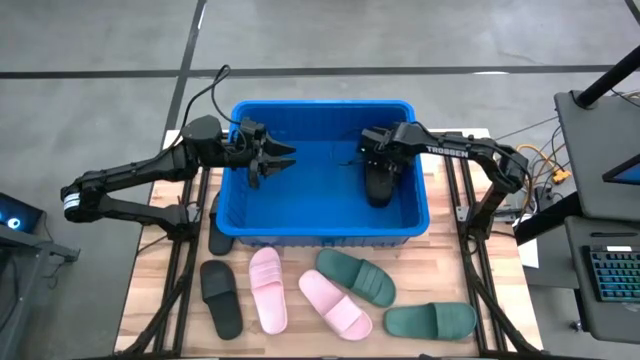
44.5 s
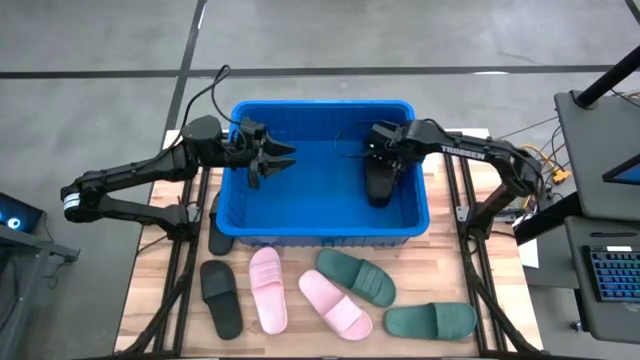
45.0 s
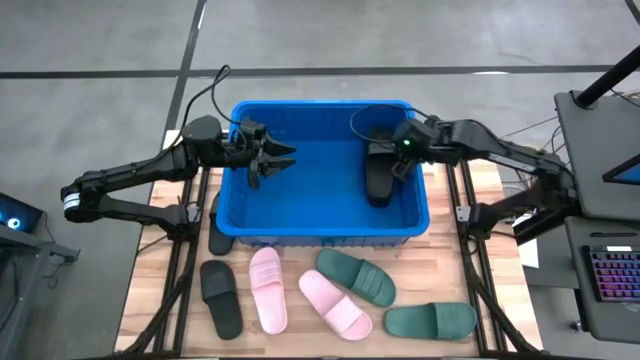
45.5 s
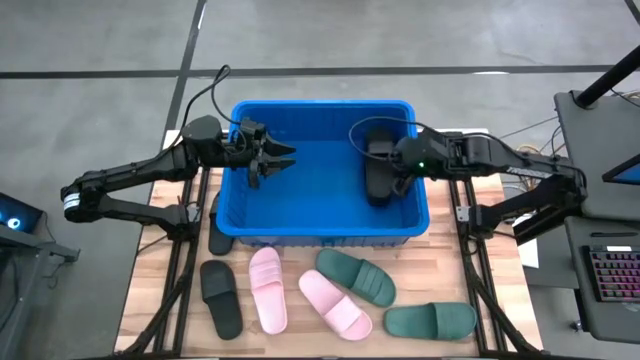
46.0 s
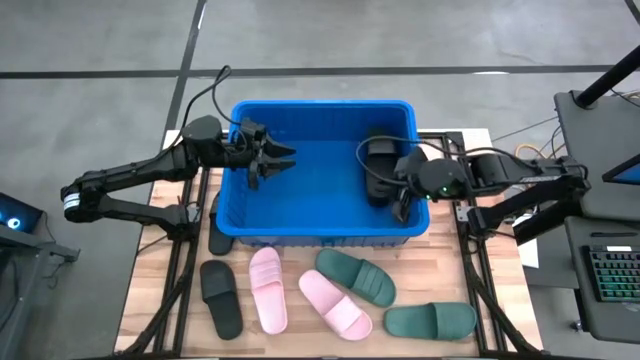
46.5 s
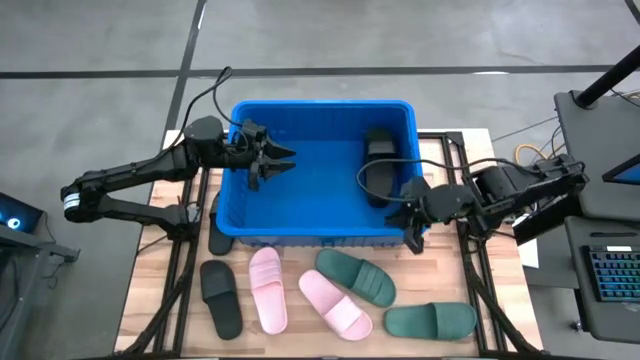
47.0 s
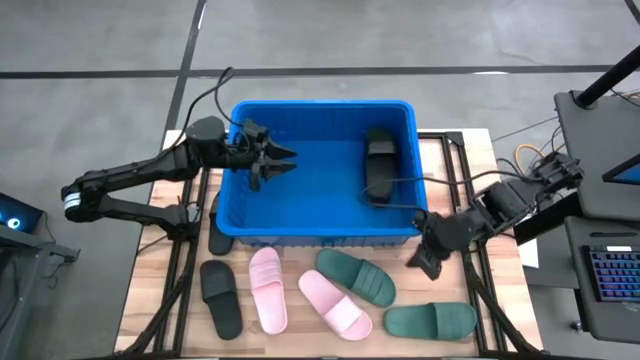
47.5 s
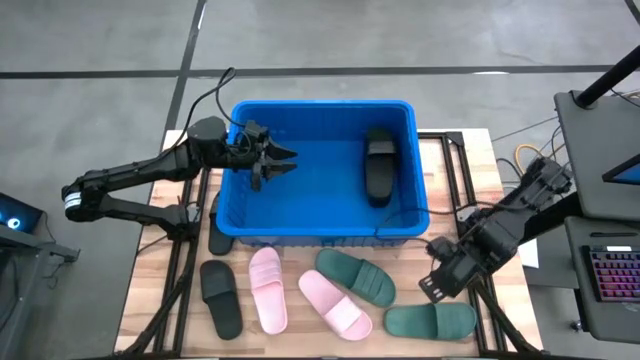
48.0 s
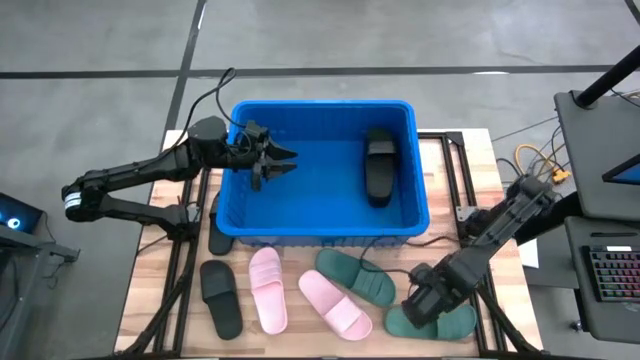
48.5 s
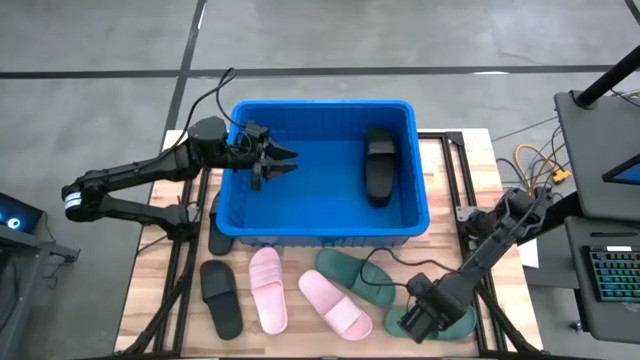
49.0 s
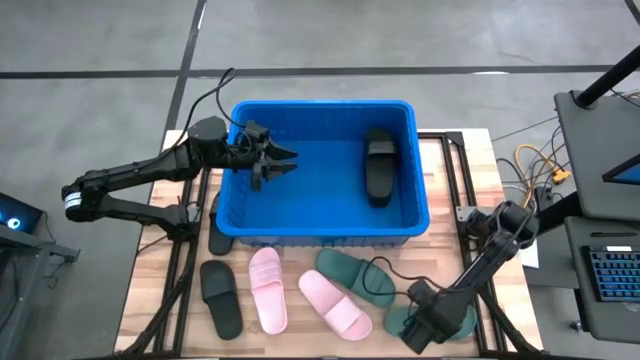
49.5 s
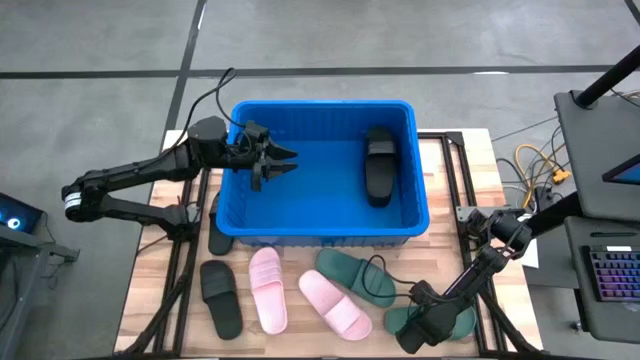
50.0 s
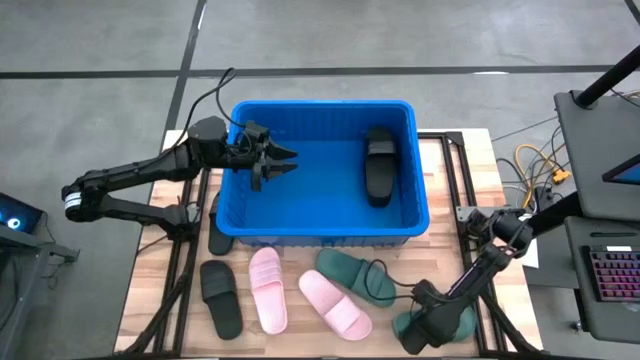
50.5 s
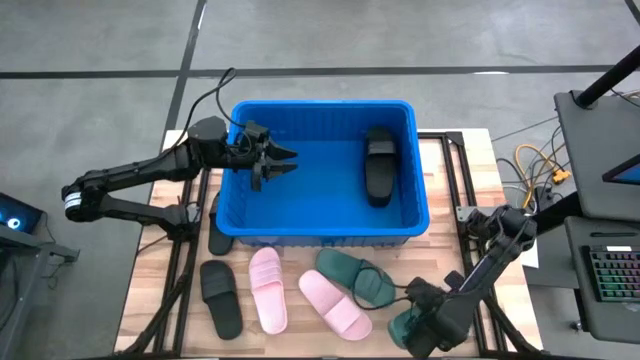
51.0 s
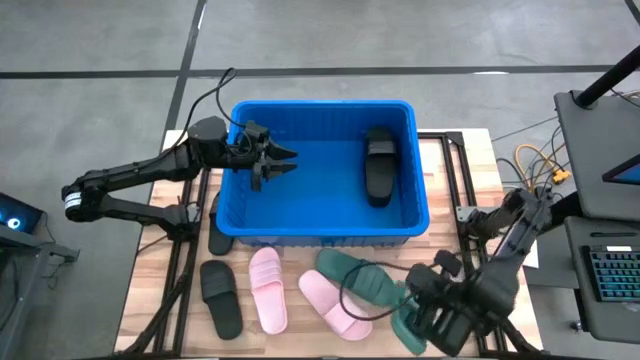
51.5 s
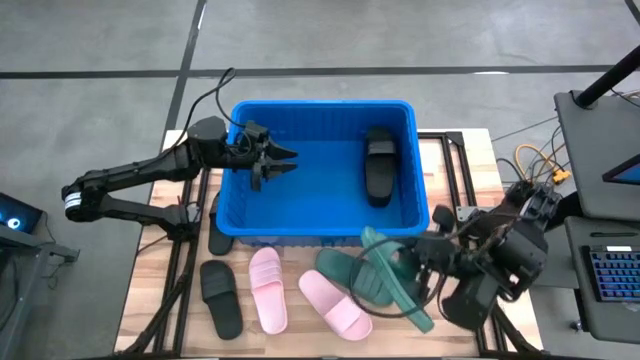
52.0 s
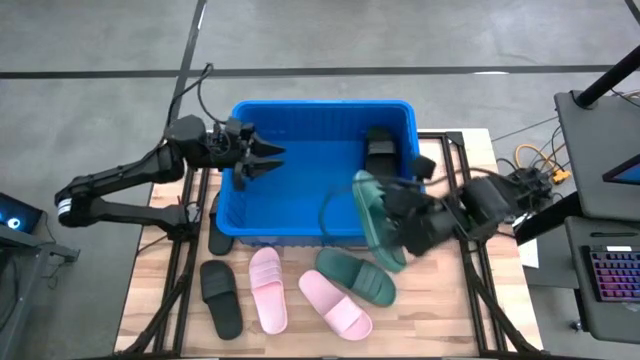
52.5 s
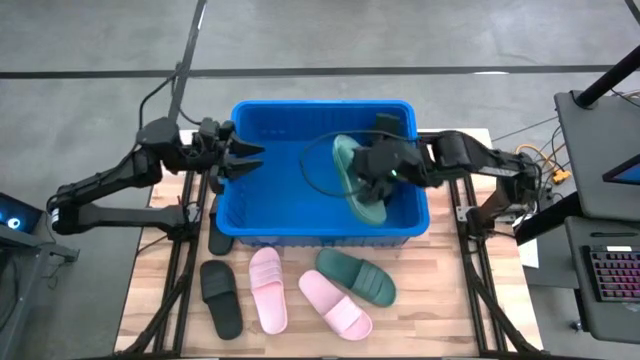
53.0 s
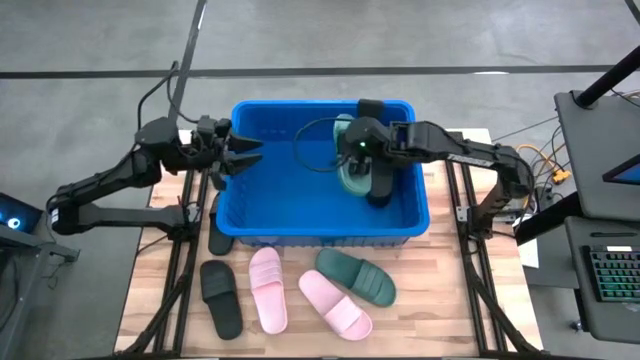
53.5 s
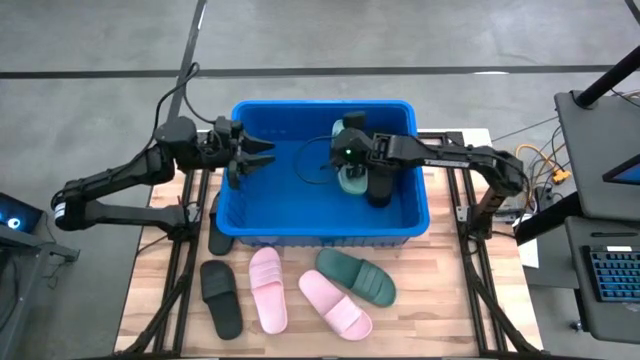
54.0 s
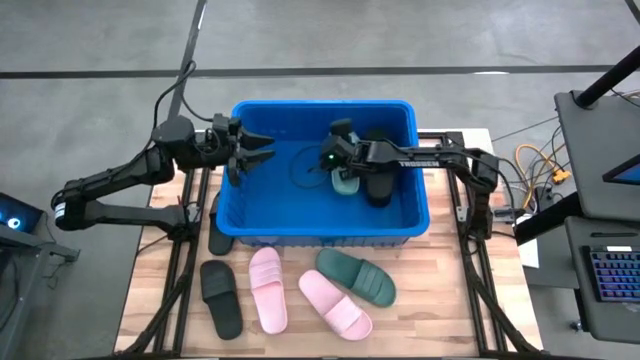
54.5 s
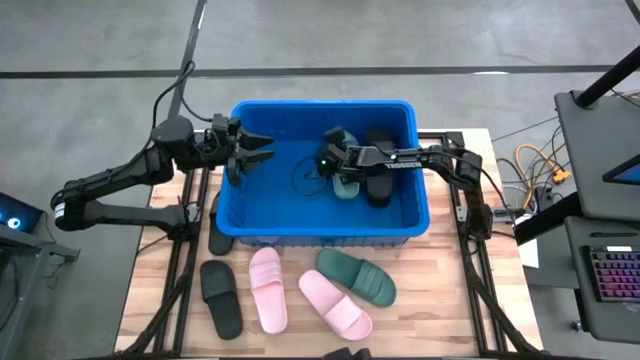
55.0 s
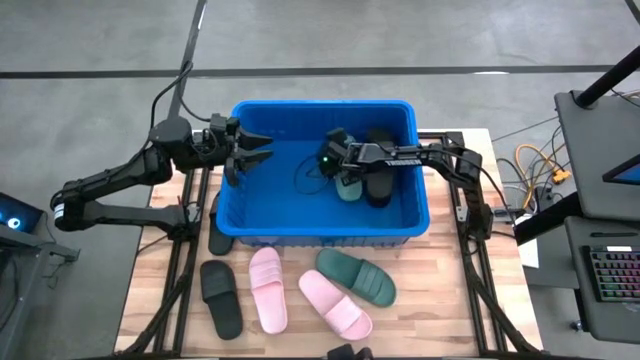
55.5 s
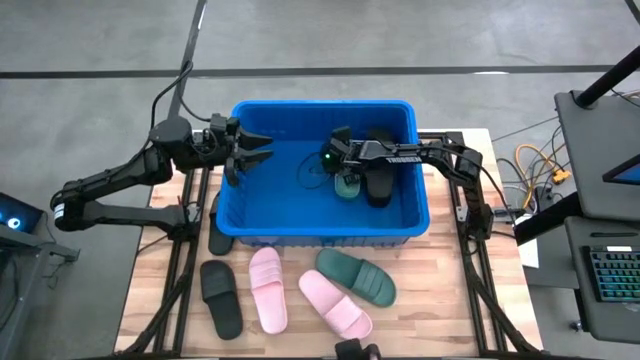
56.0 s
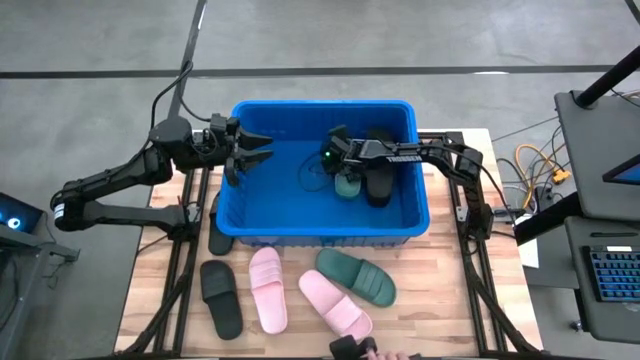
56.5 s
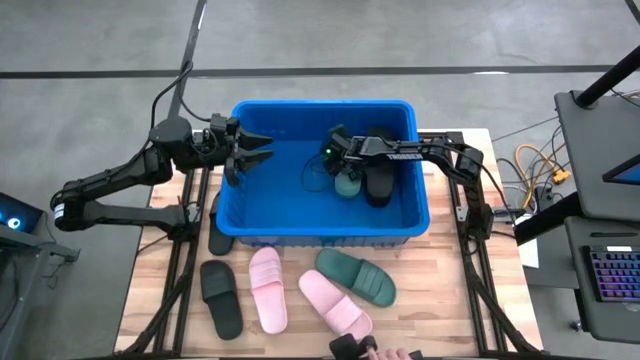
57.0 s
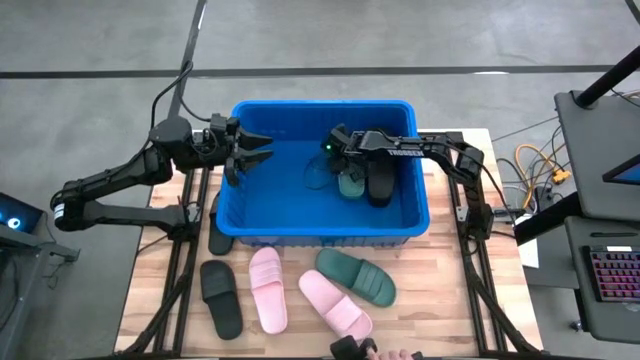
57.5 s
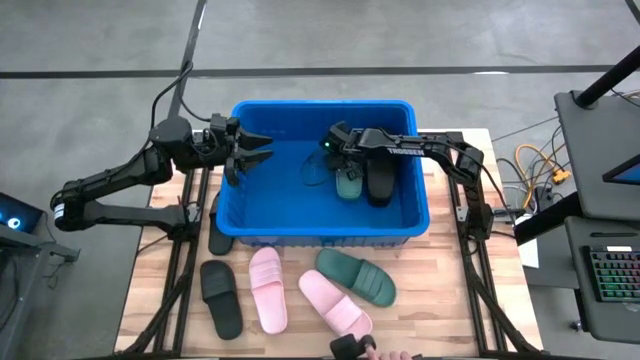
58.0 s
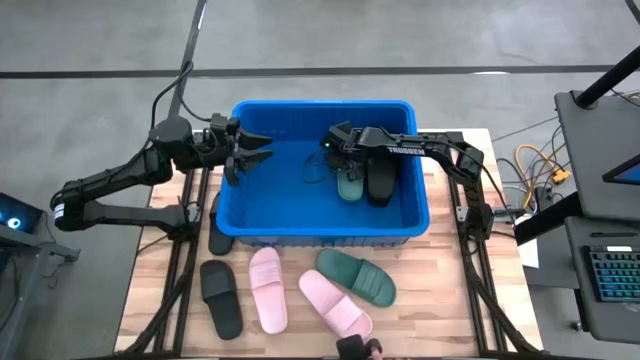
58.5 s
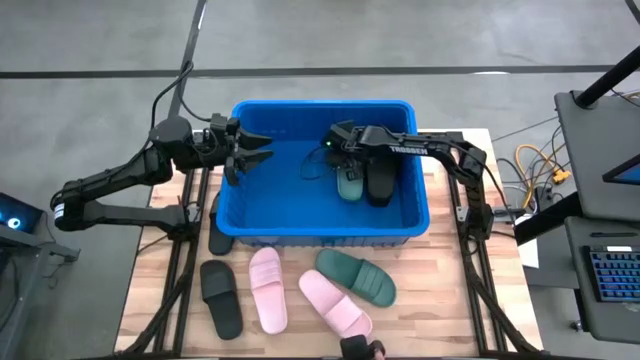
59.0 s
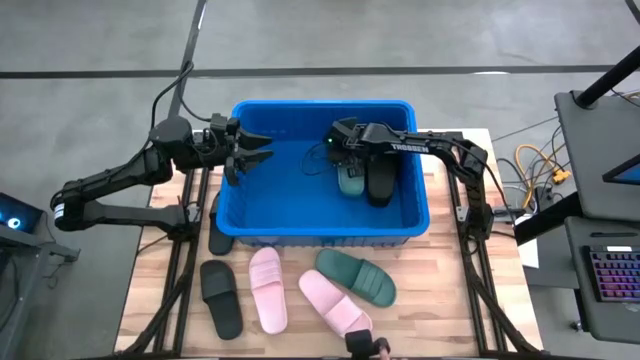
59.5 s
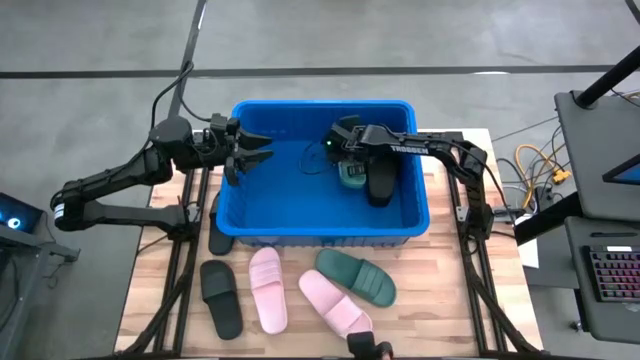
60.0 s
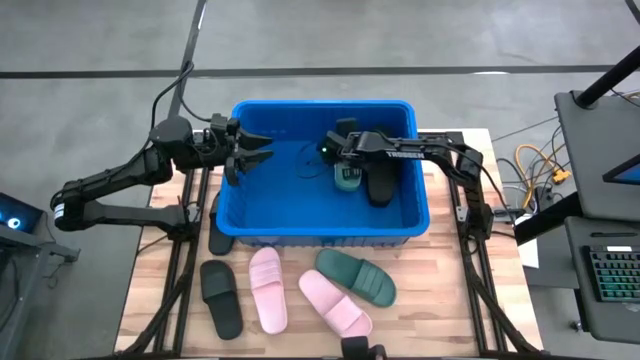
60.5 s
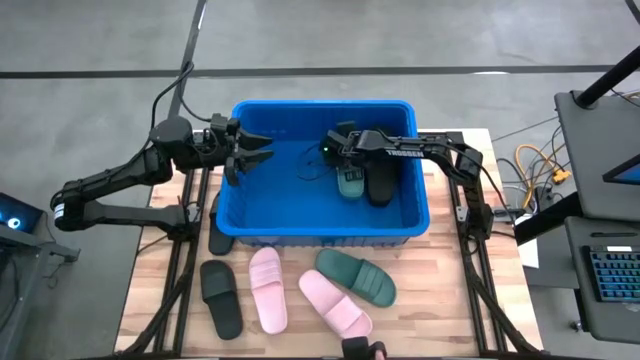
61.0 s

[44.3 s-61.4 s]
Task: Pick and place slides into bin
Put the green slide into the blue bin

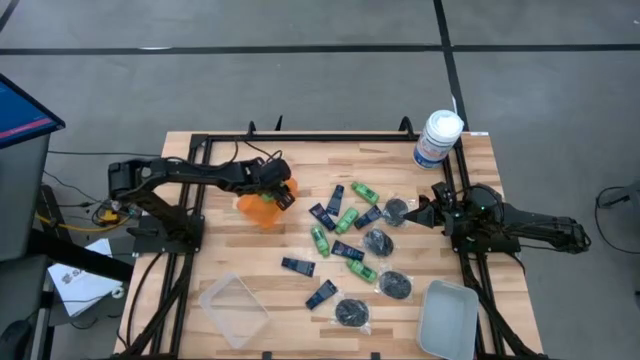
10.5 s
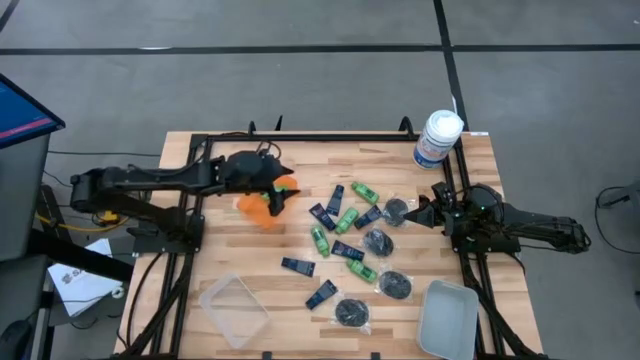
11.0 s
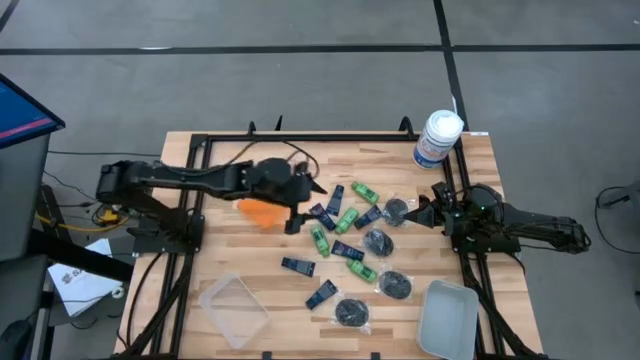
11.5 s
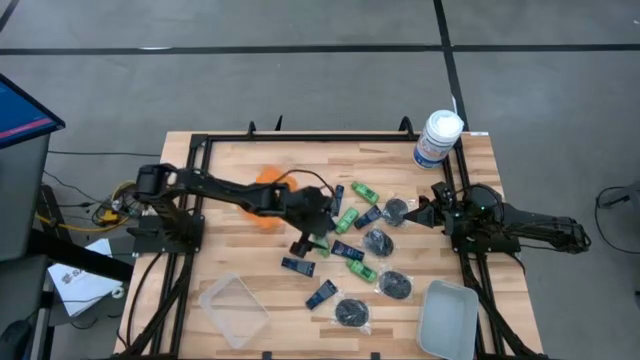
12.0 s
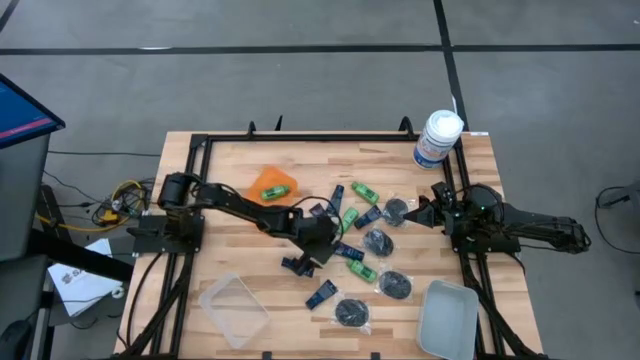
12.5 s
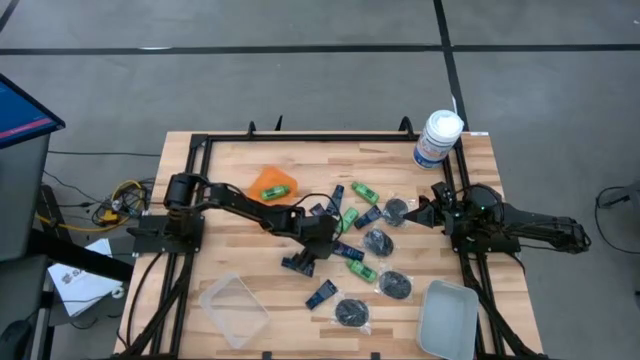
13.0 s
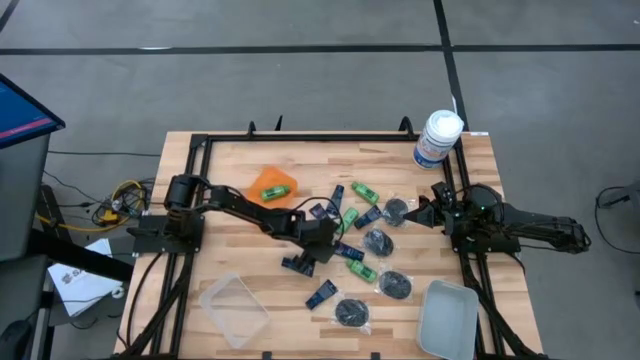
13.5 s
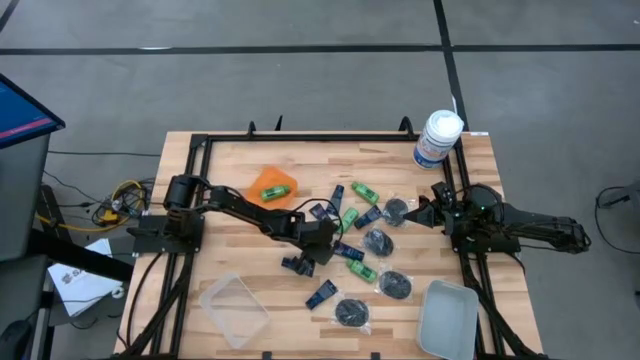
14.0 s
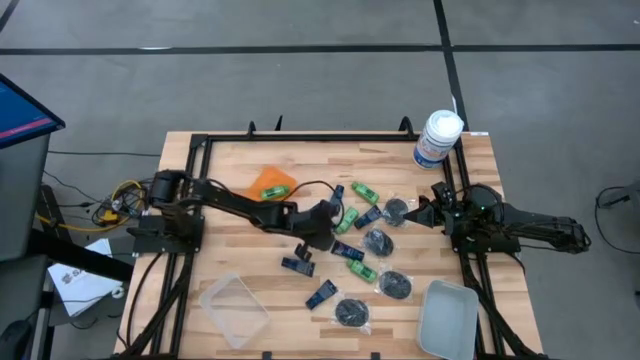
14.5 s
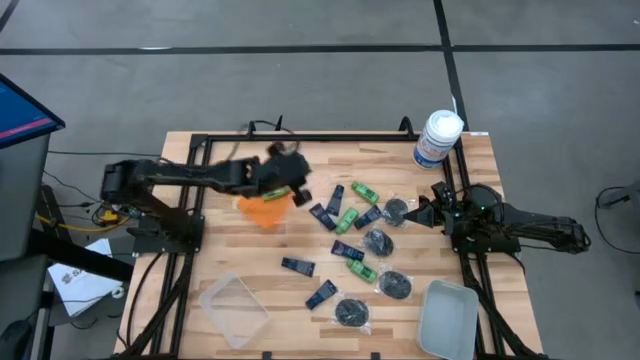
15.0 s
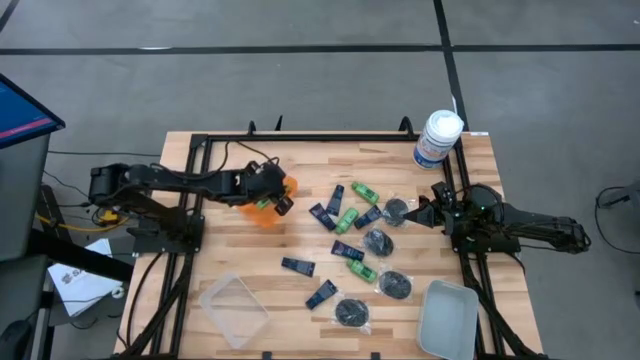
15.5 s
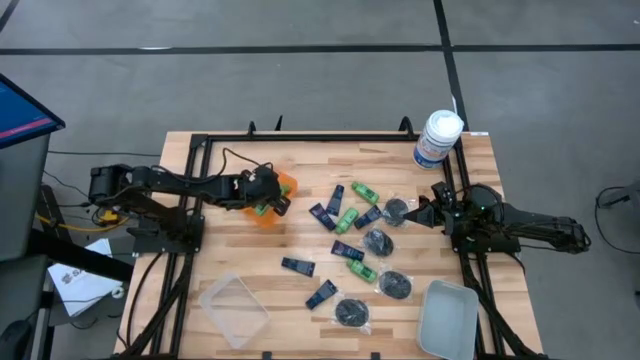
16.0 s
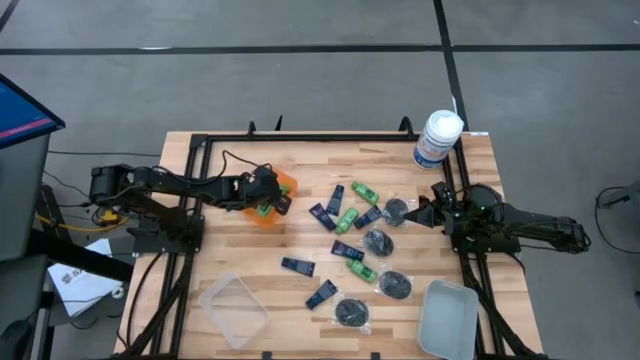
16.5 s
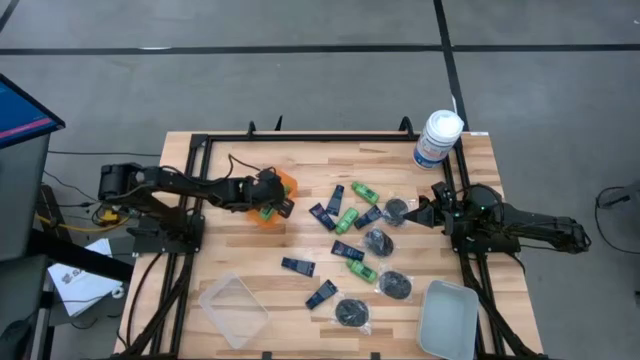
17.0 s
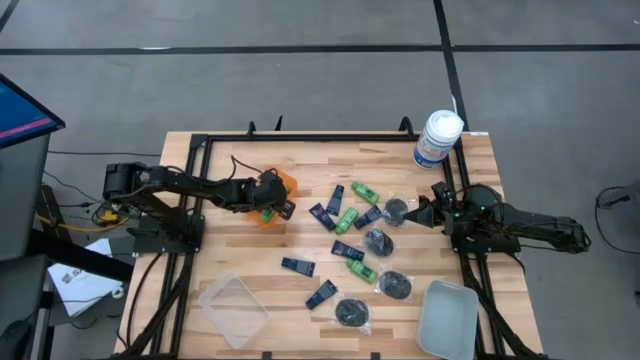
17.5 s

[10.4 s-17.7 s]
Task: Pick & Place Travel size toiletries
Put the green shampoo bottle into the top orange bin
